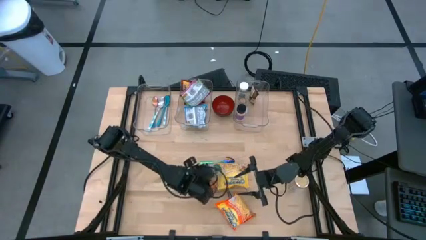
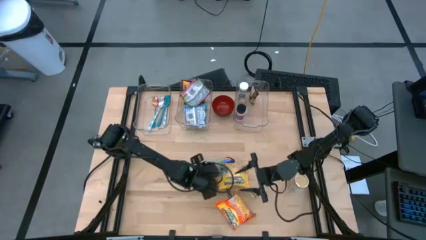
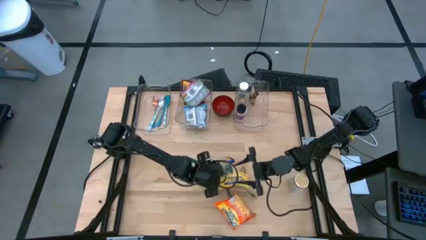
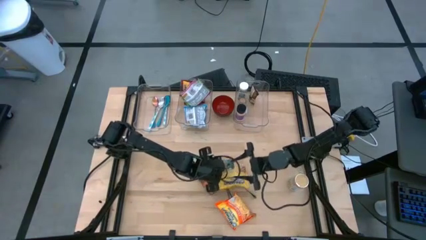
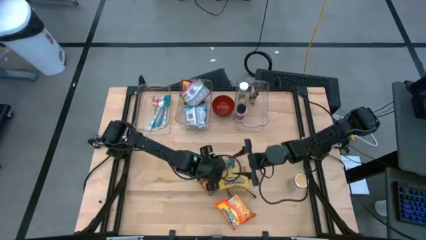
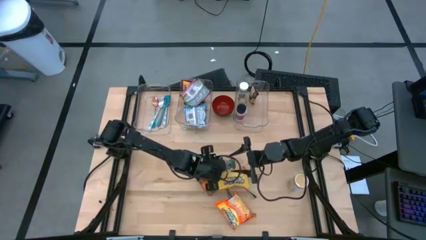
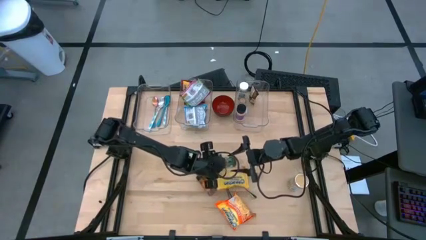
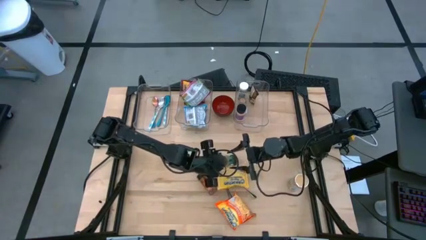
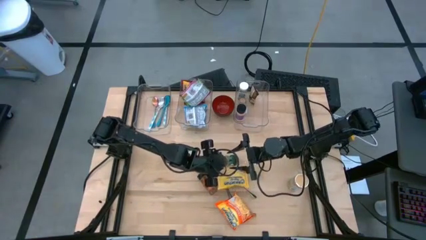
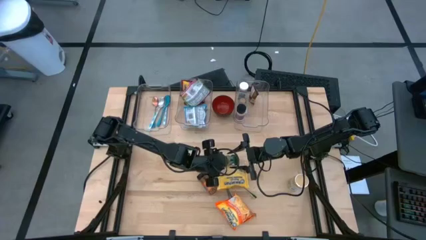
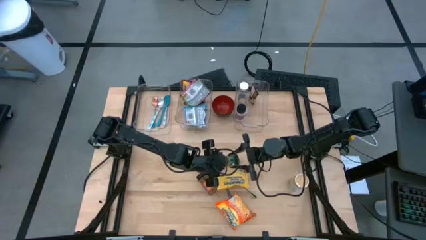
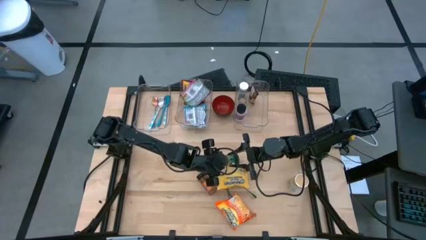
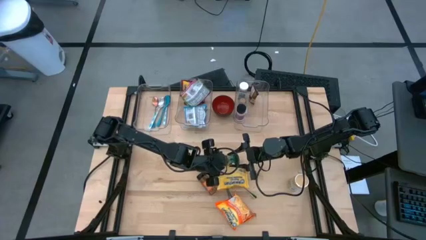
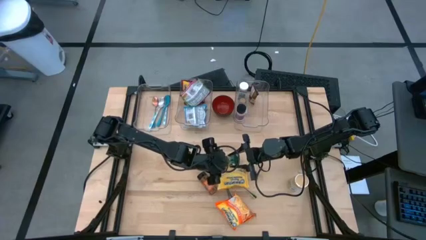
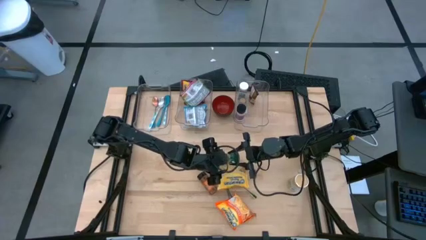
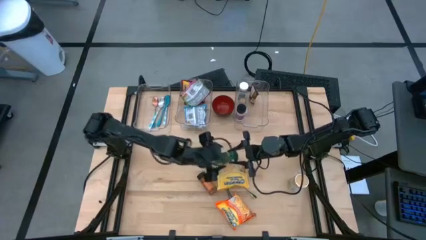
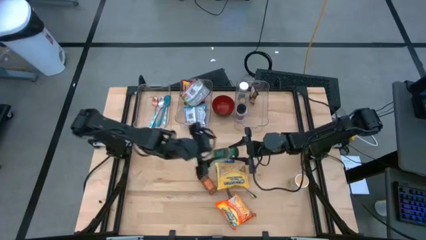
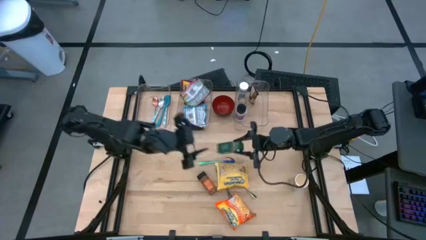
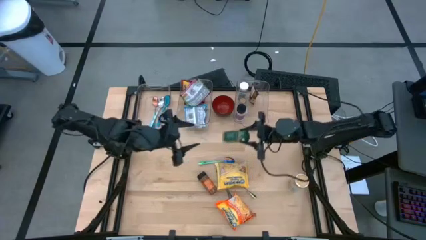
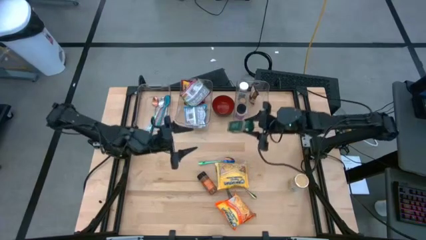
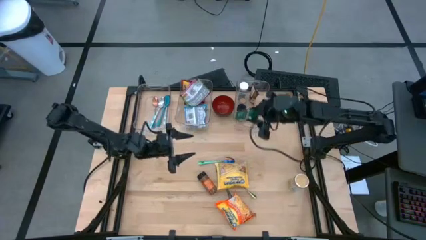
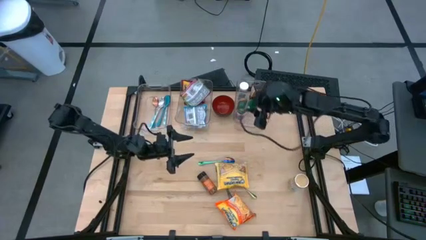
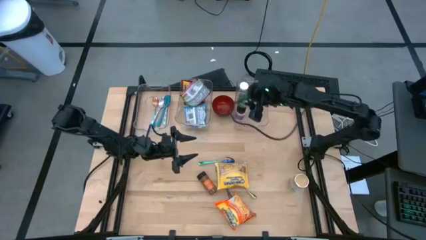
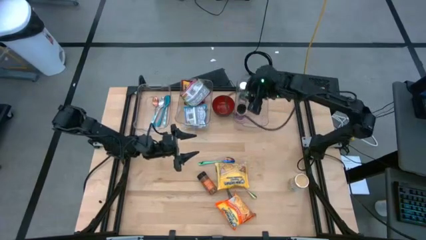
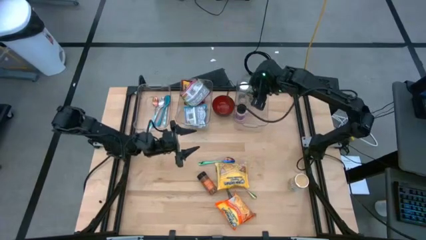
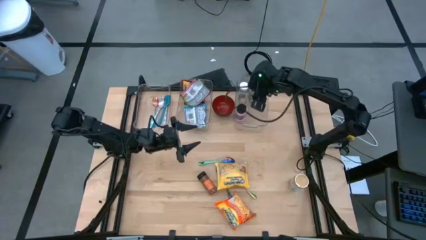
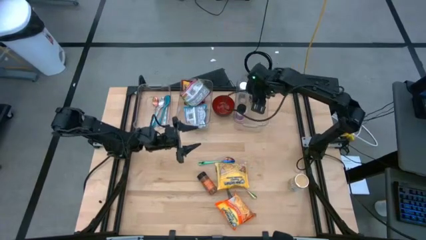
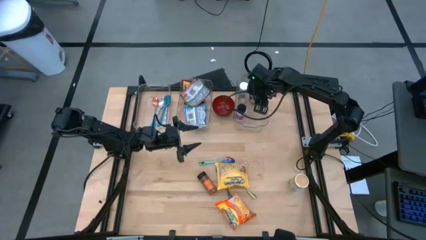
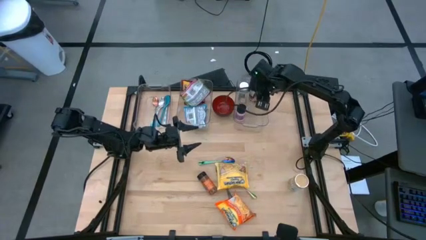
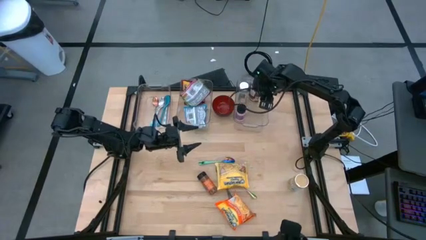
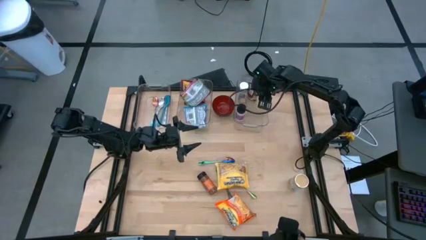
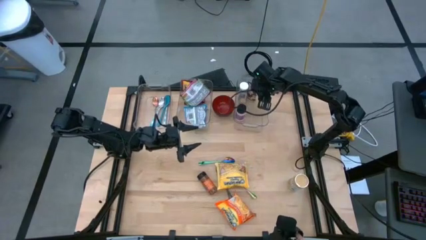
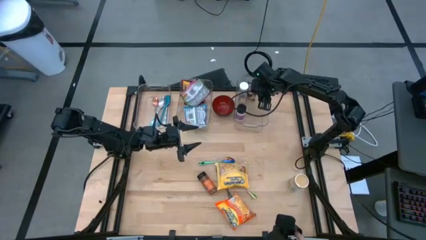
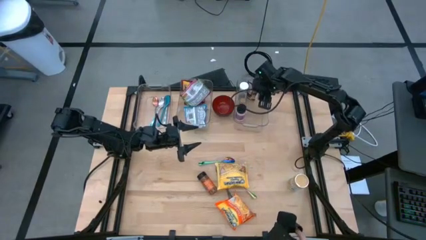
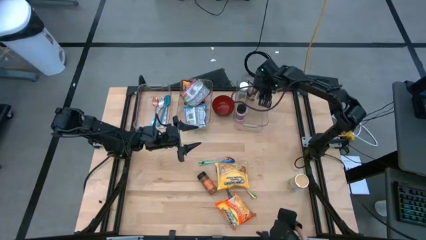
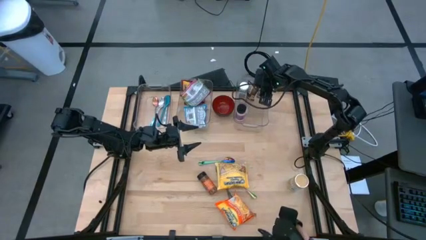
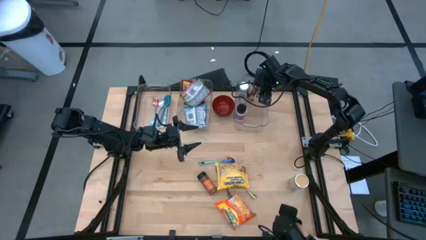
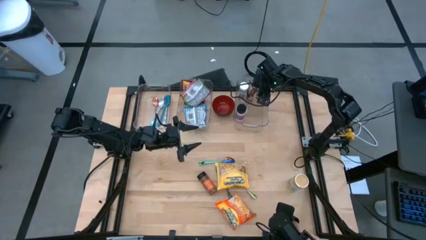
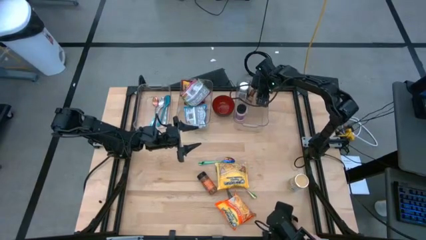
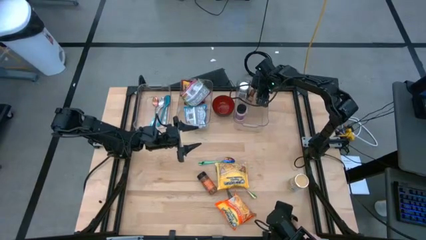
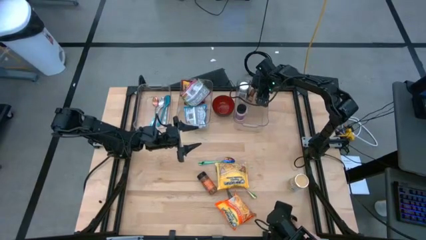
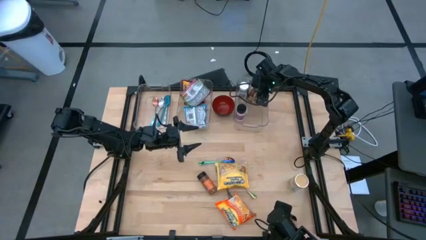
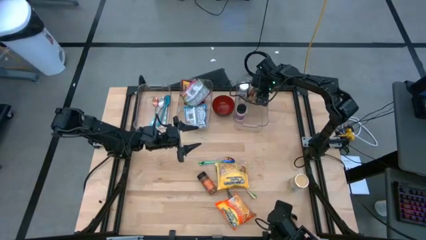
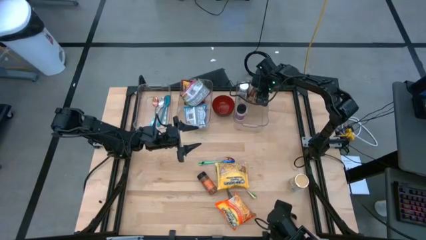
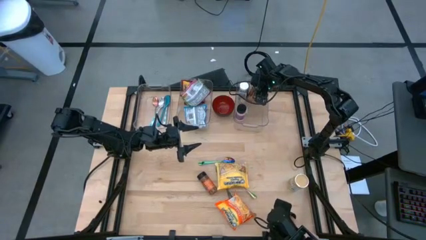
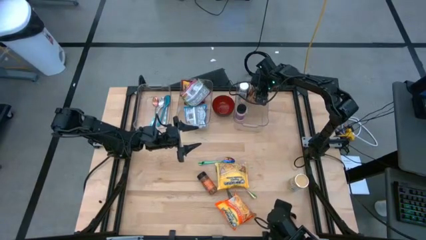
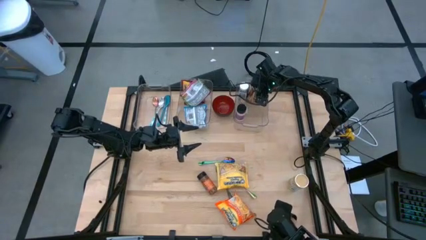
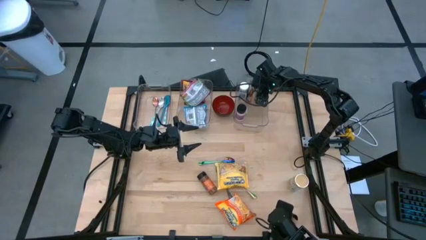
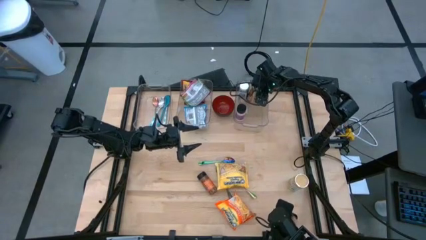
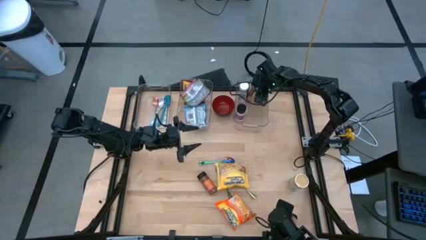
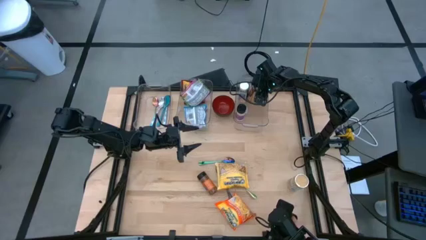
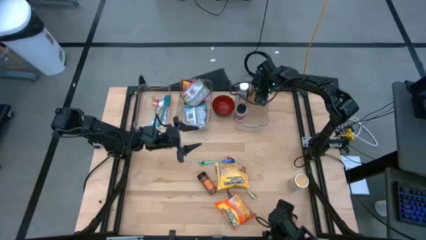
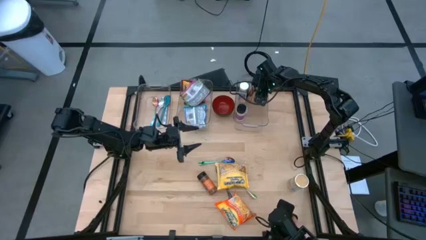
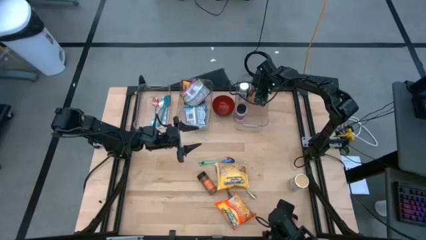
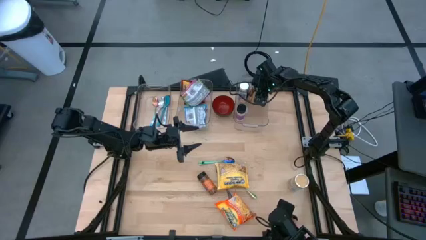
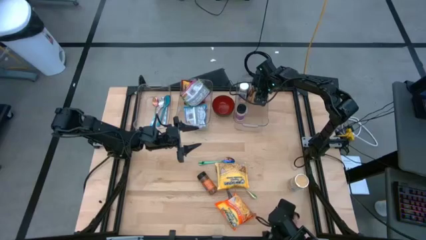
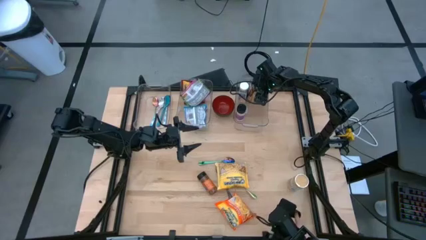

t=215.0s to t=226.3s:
Task: Pick & Place Food Item
Put the green seasoning bottle into the right transparent bin

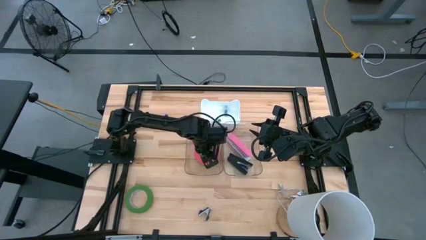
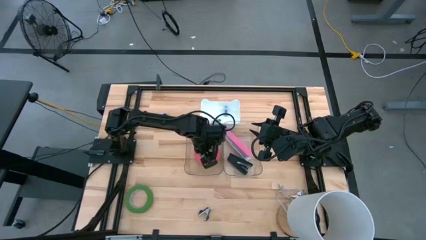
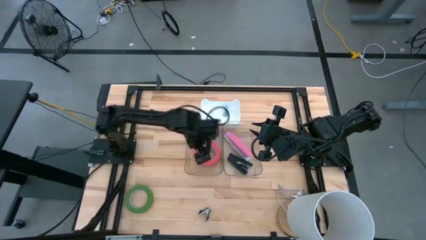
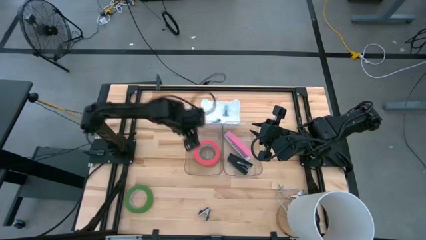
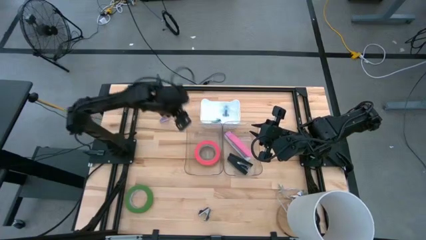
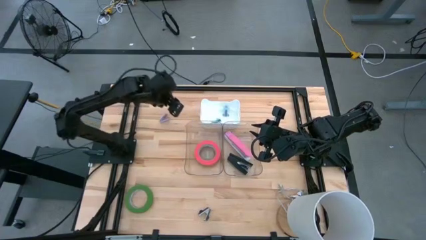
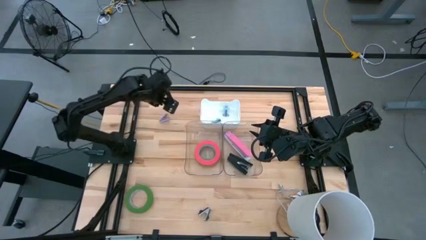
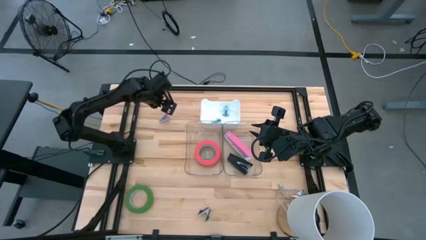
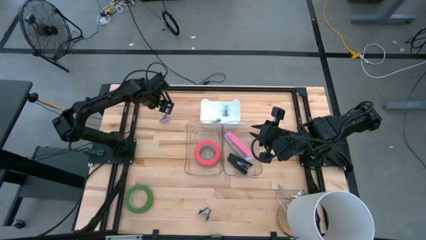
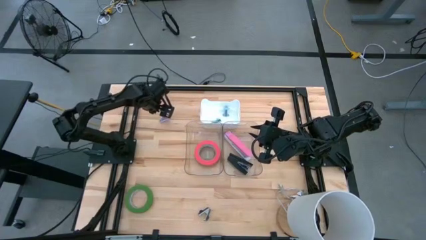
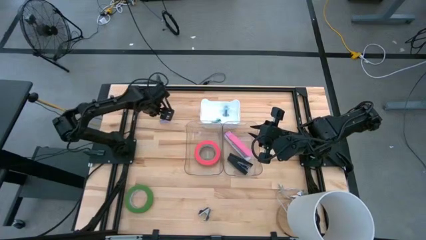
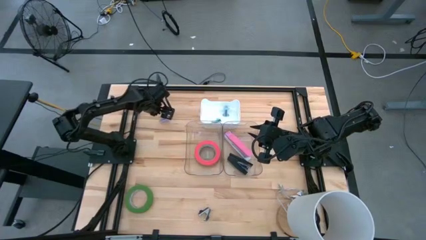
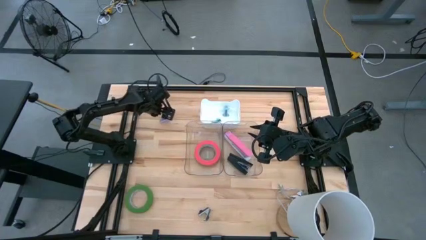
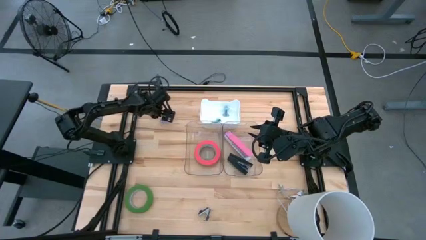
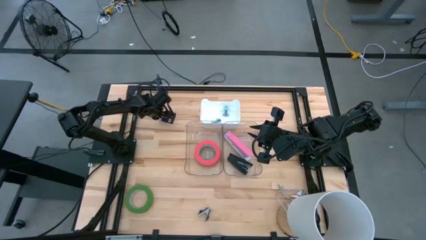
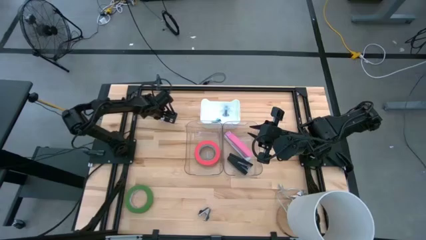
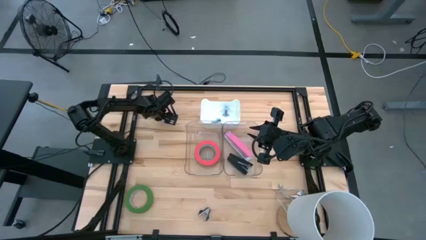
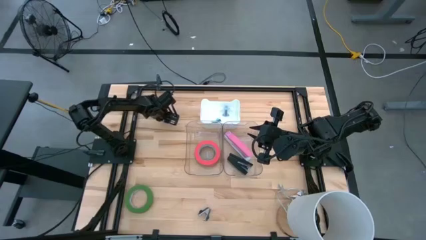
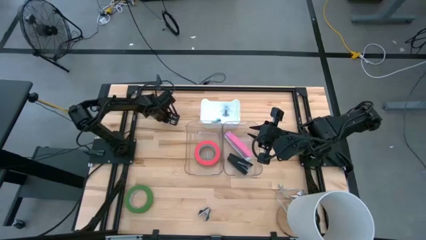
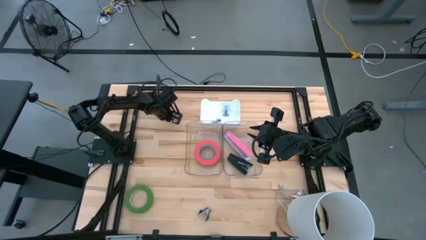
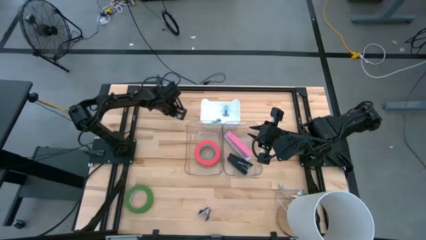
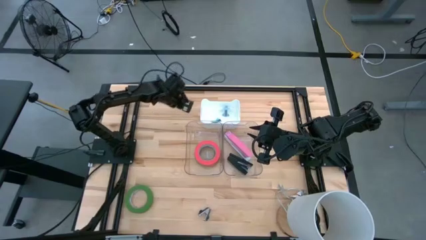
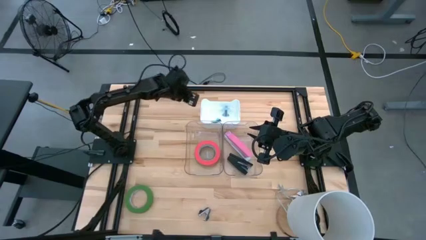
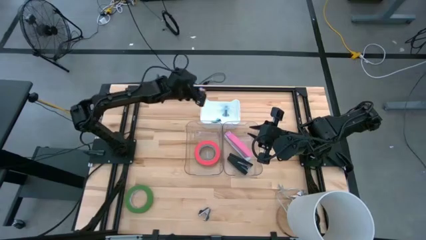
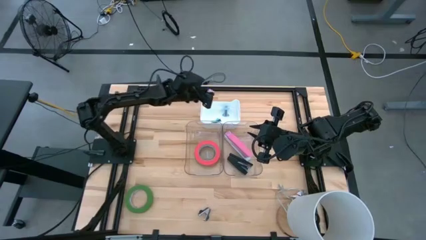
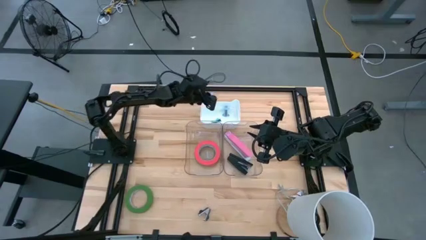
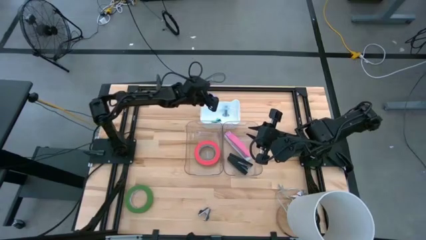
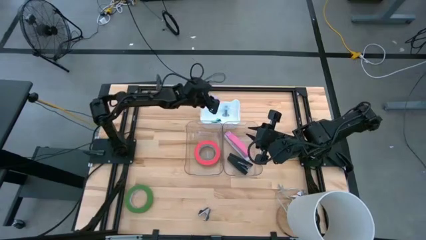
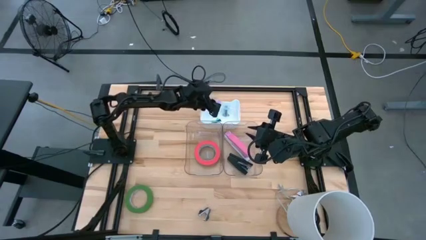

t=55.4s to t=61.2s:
Task: Pick and place Stapler, Stapler remover, tape
Put the violet staple remover into the white bin
